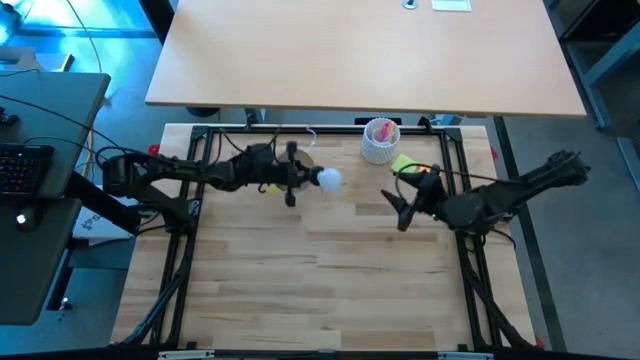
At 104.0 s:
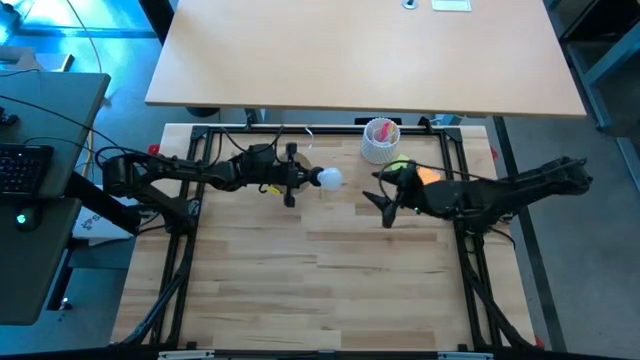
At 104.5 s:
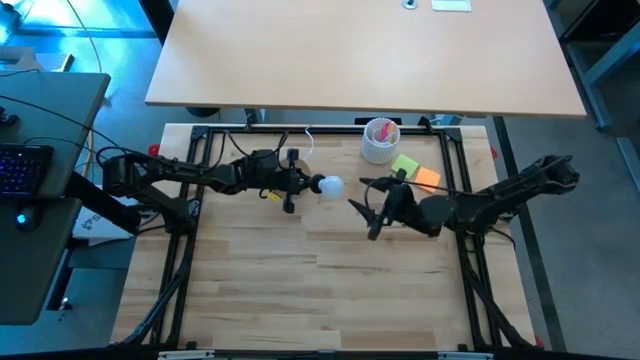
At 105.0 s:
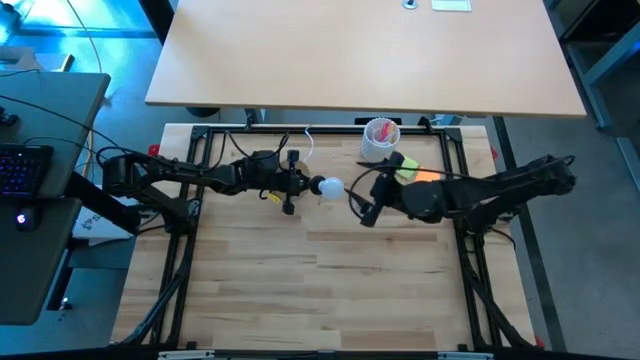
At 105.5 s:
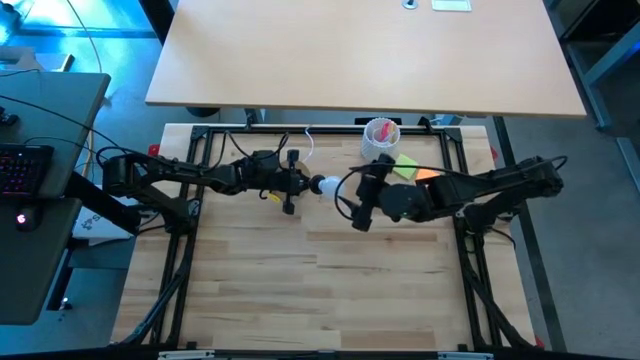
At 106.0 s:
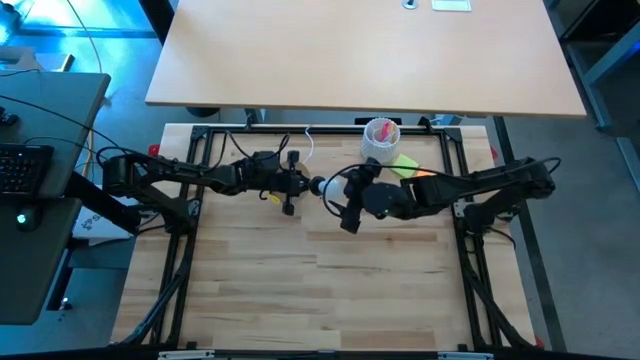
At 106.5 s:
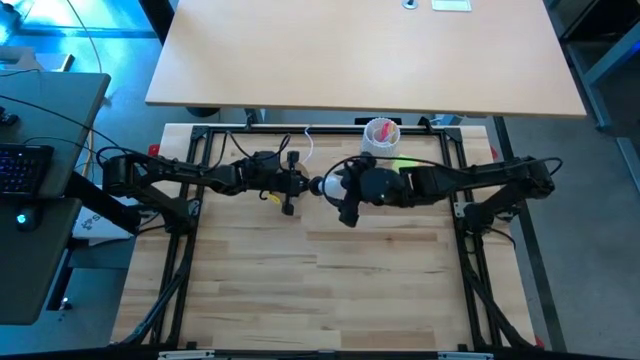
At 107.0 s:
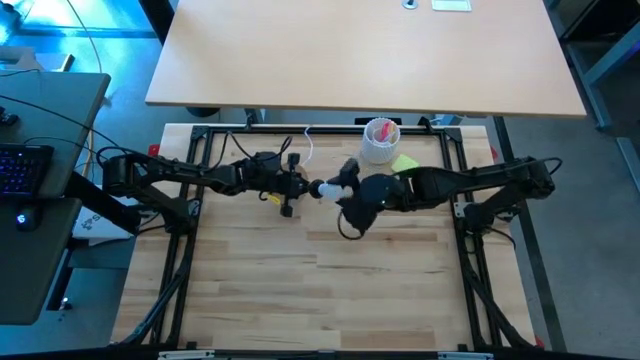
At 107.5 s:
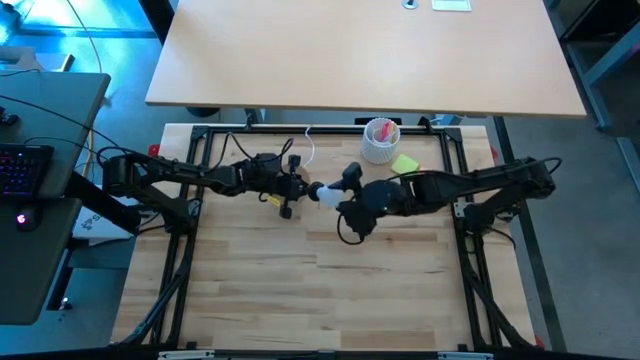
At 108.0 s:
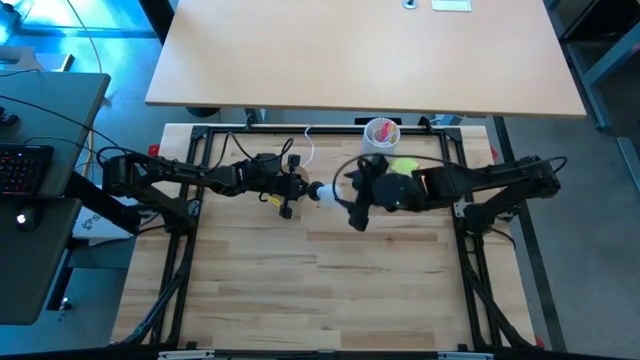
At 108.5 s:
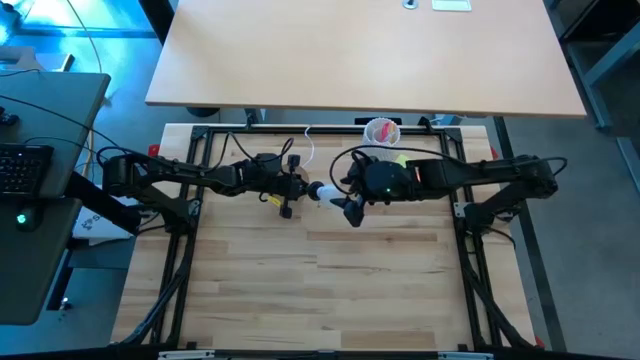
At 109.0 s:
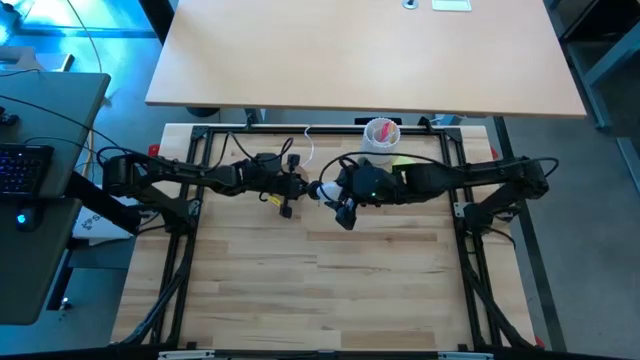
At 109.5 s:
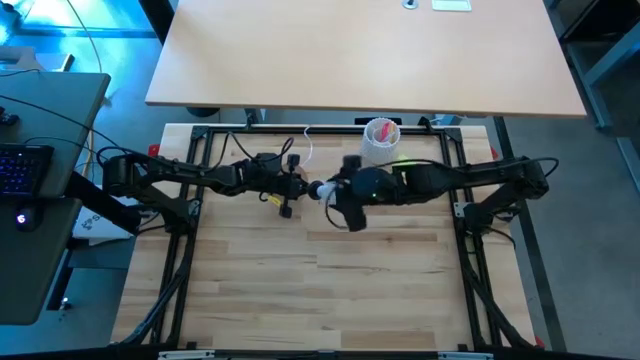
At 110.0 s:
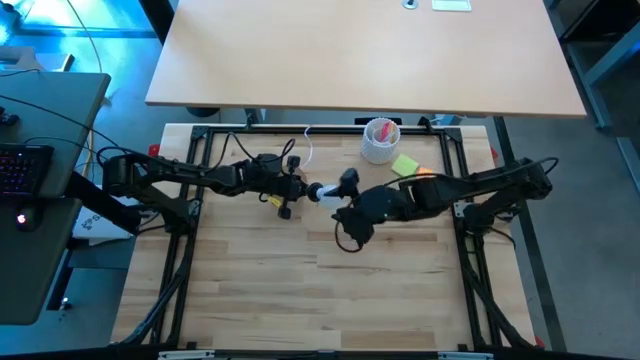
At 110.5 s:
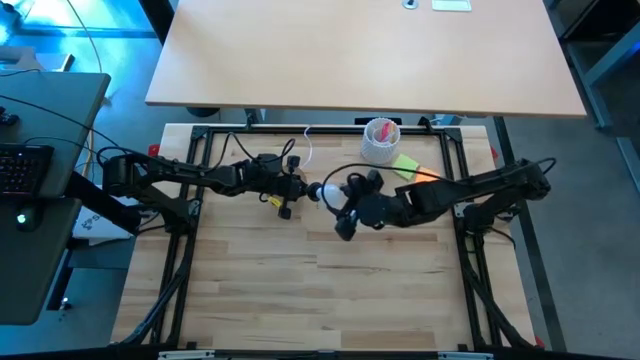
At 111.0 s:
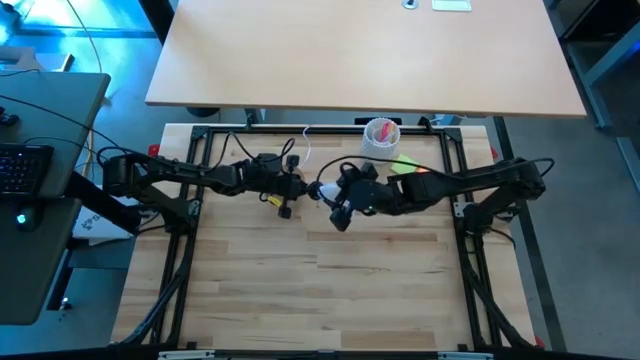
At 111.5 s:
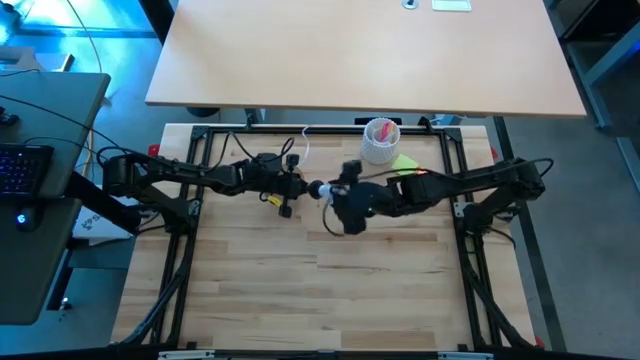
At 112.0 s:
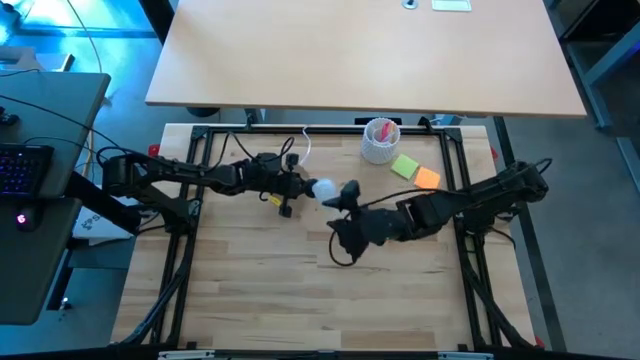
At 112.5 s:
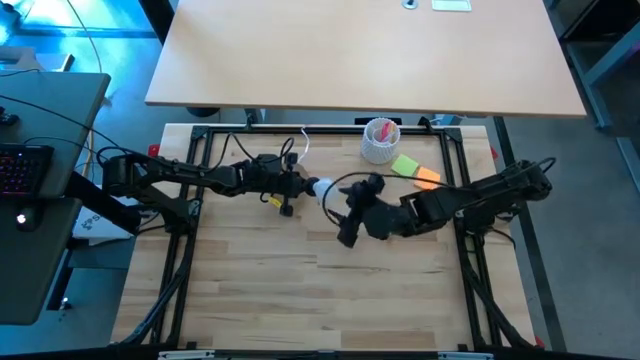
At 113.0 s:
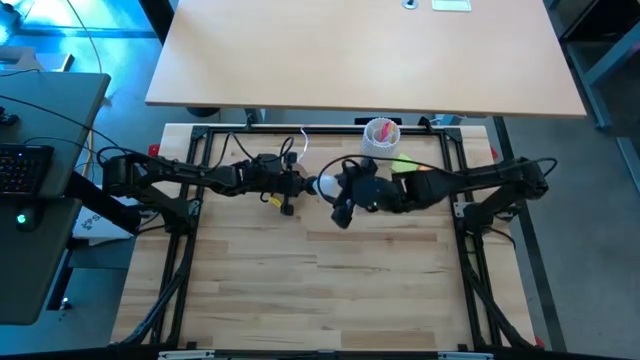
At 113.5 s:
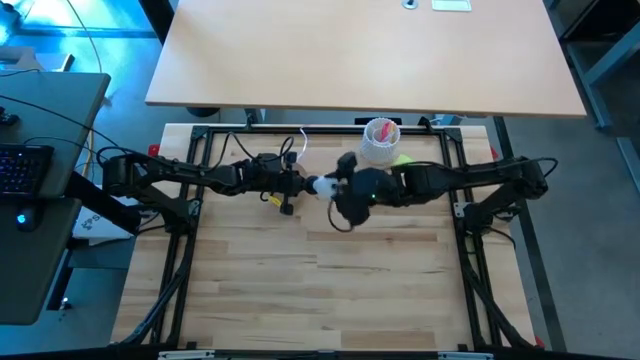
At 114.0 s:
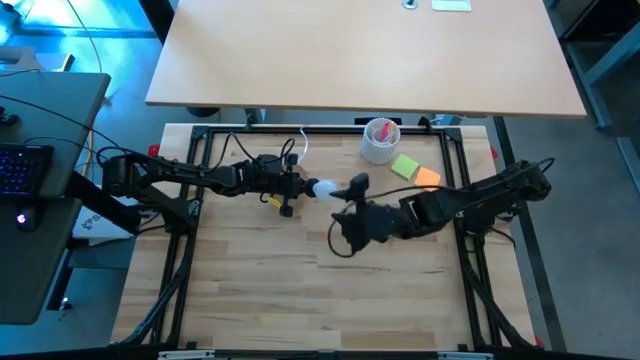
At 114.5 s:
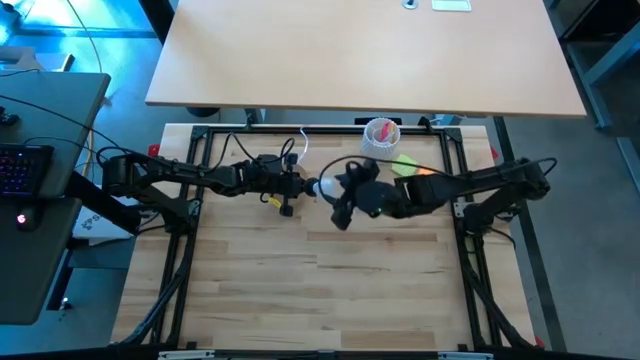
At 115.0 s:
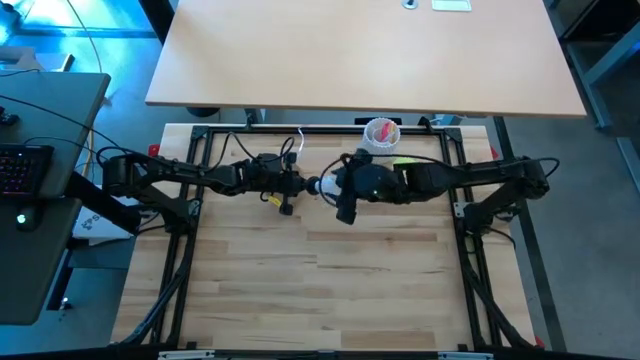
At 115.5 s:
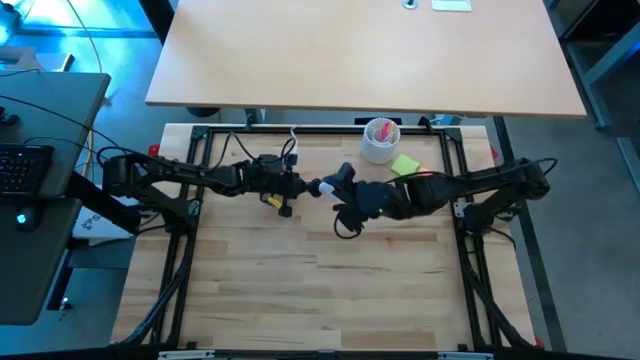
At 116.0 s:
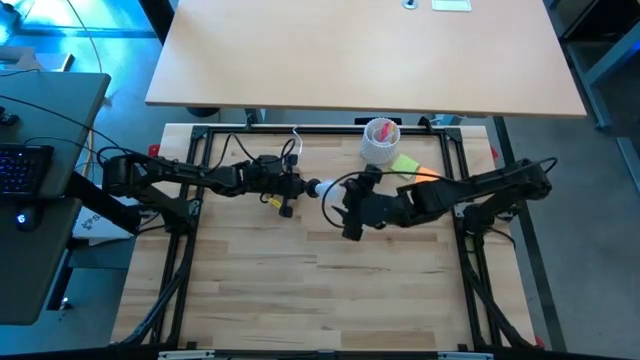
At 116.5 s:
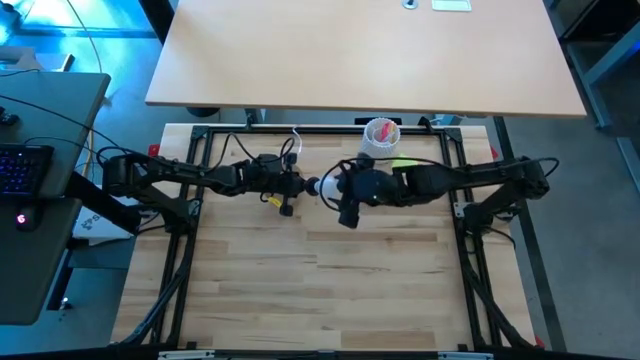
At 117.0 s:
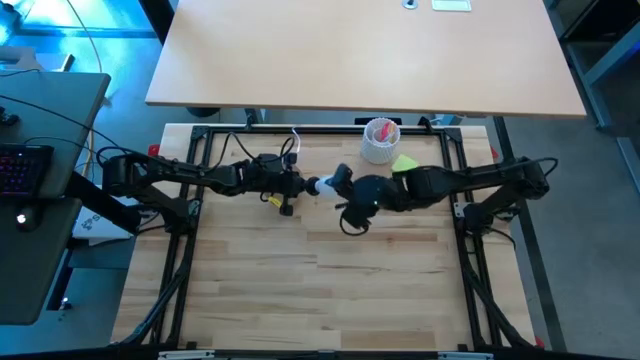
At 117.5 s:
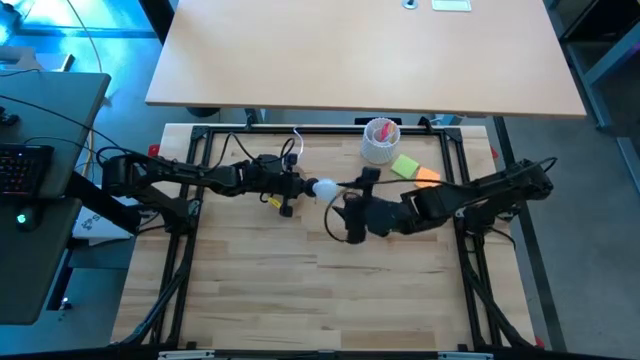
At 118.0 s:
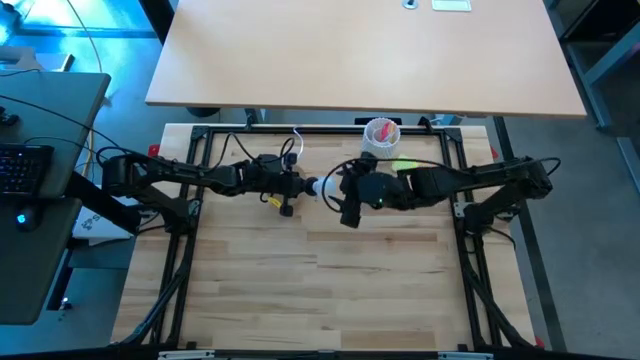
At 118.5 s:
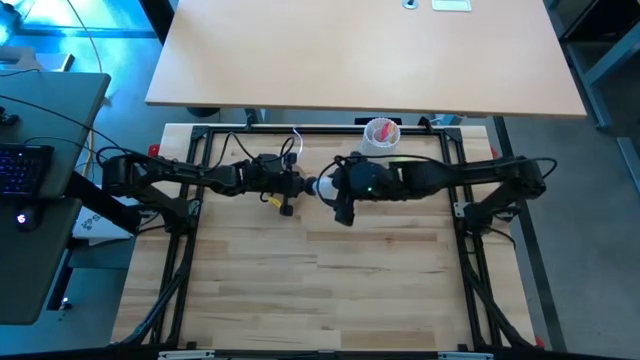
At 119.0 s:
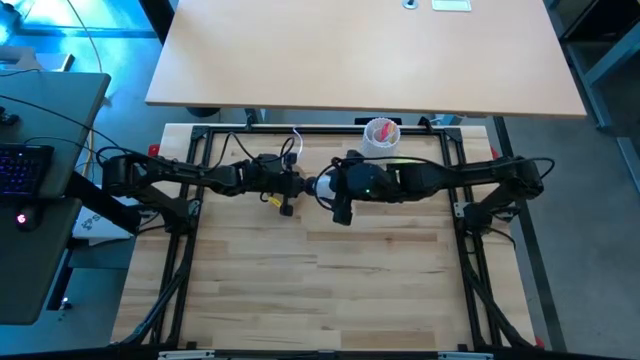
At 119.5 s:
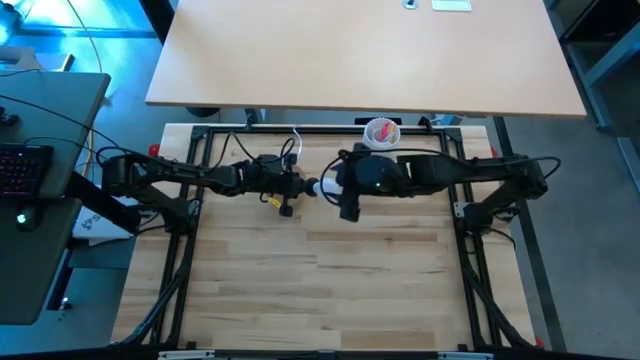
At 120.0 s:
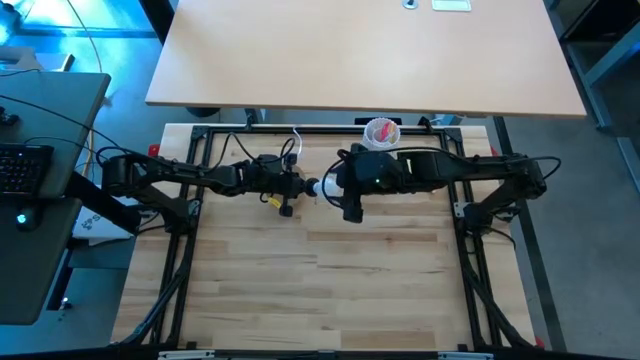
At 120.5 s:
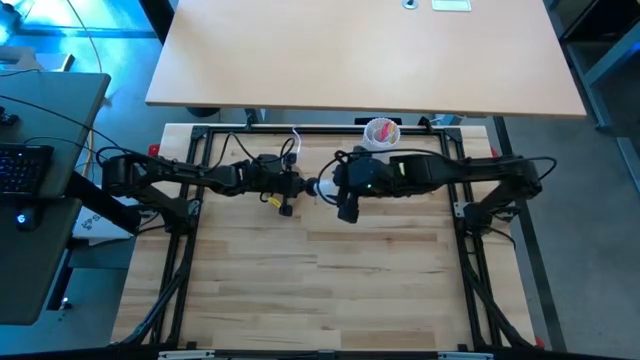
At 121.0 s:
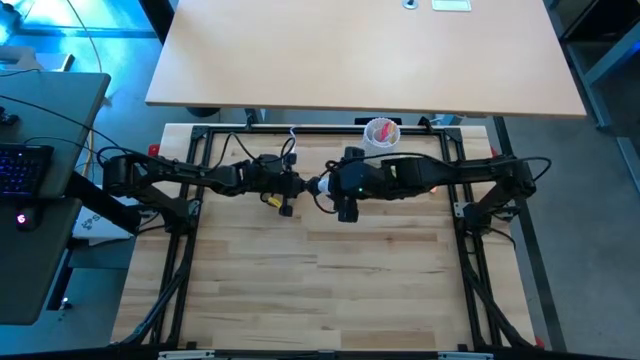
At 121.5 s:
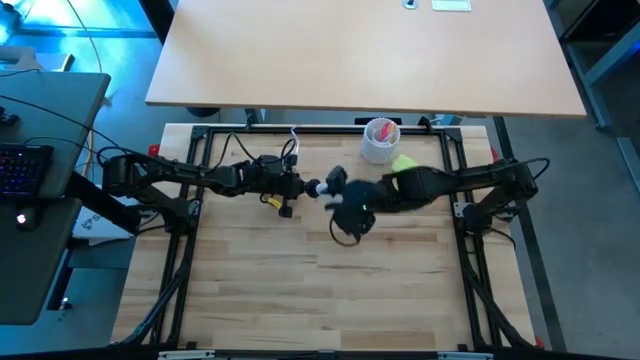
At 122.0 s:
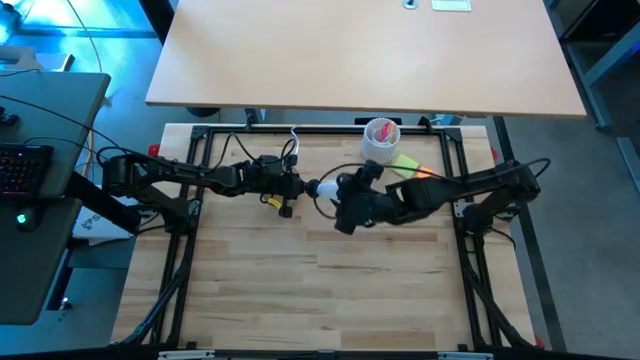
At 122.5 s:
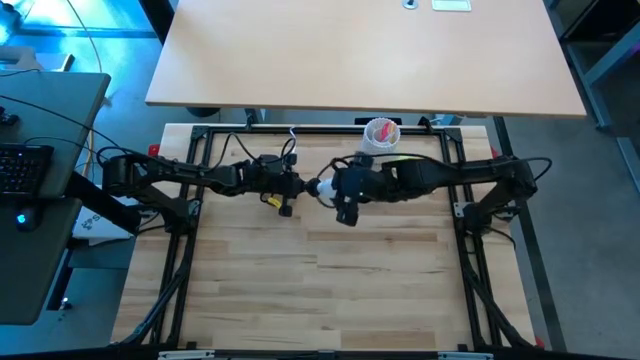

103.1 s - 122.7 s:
Task: Screw lightbulb
Remove the lightbulb from the lamp

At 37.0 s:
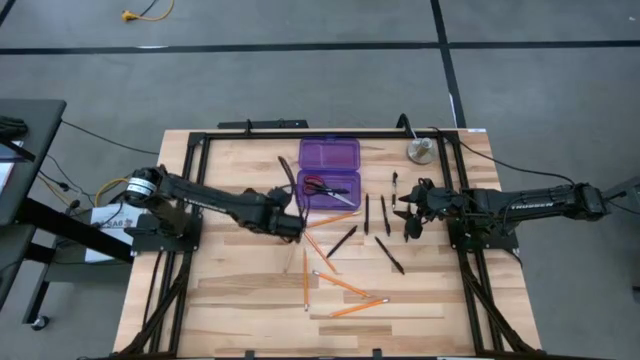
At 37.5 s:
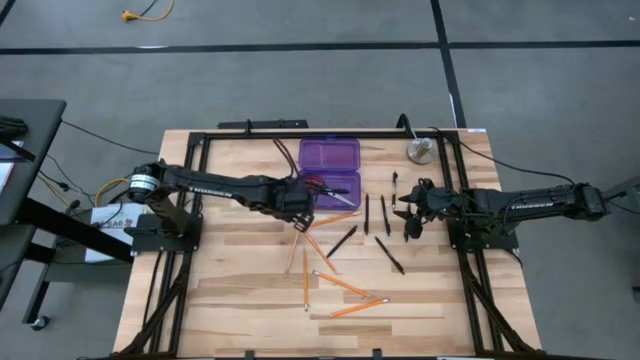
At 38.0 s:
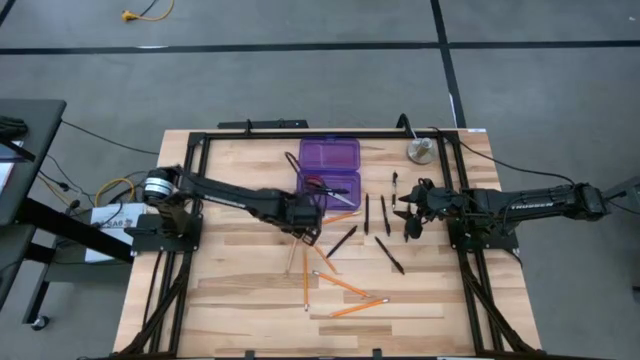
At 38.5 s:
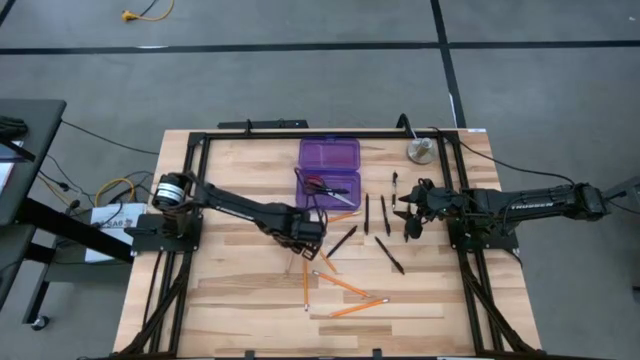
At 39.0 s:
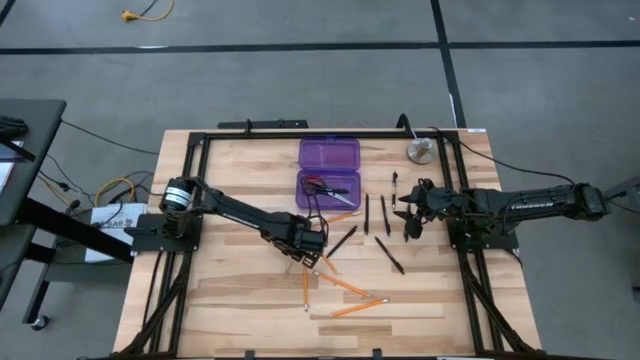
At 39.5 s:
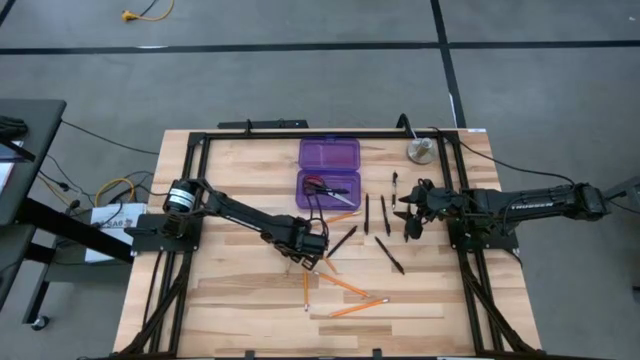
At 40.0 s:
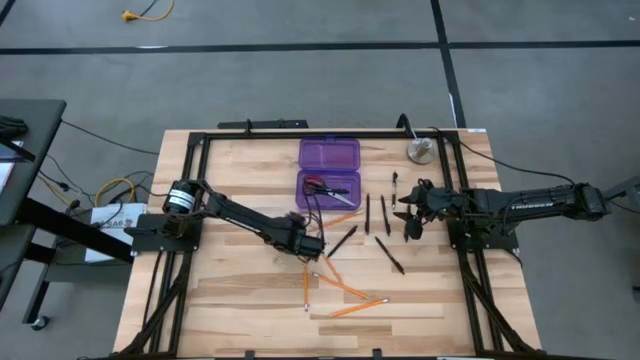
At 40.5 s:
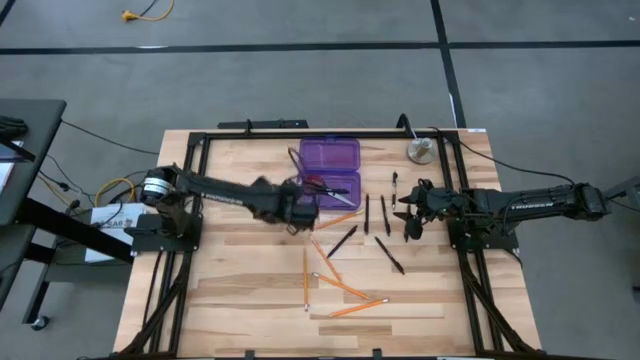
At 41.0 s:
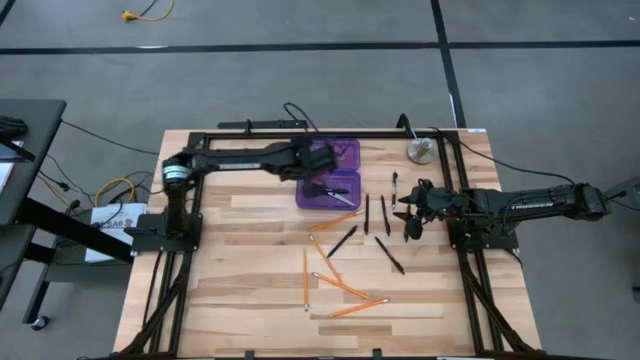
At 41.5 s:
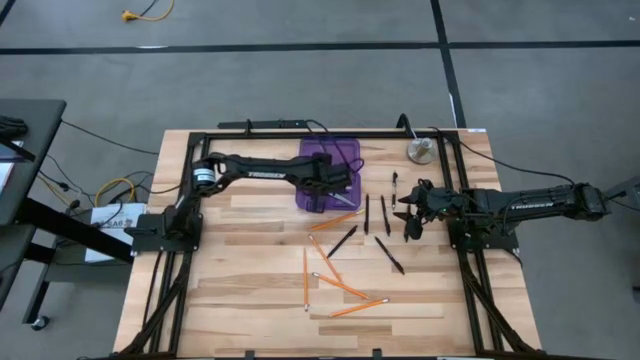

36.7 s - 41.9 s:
Task: Pick & place school supplies into a supply box
Put the pink pencil into the violet supply box
